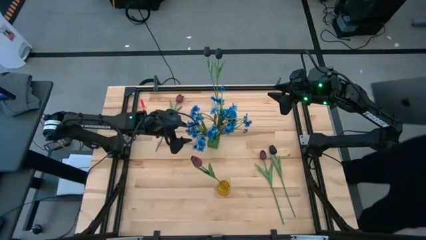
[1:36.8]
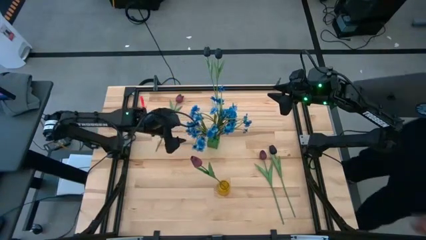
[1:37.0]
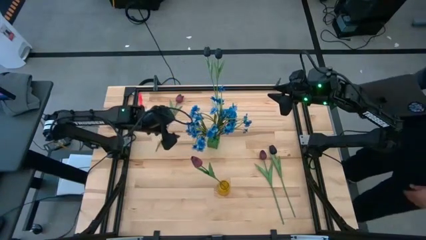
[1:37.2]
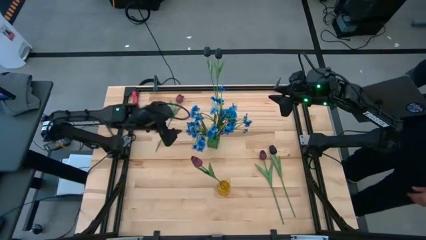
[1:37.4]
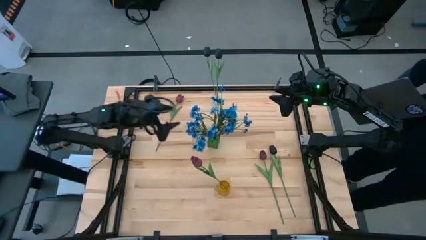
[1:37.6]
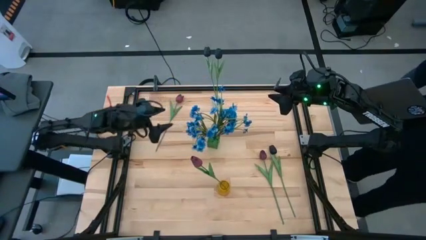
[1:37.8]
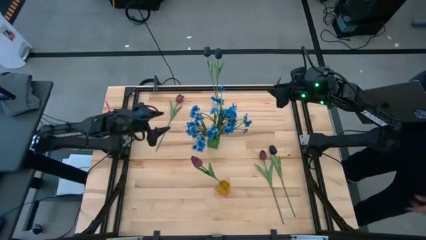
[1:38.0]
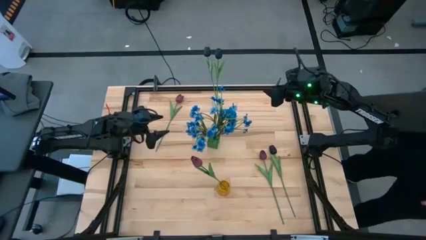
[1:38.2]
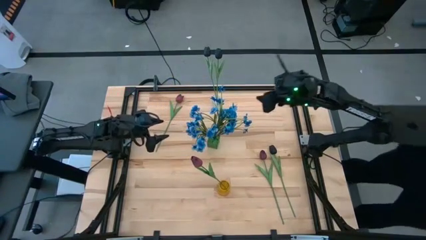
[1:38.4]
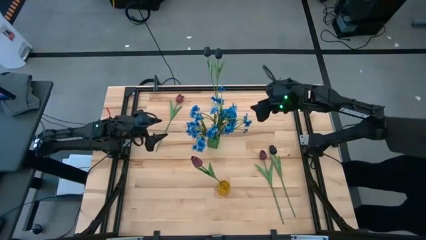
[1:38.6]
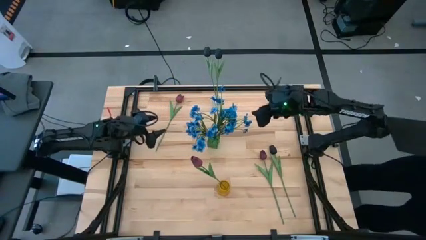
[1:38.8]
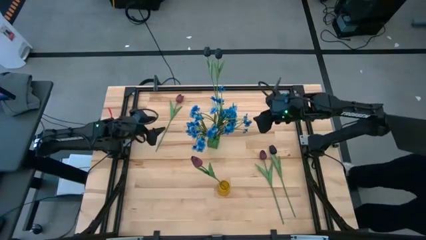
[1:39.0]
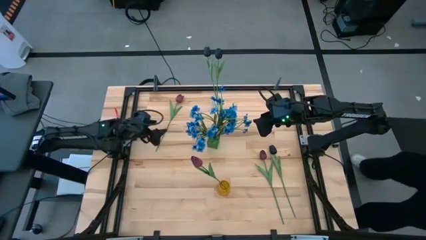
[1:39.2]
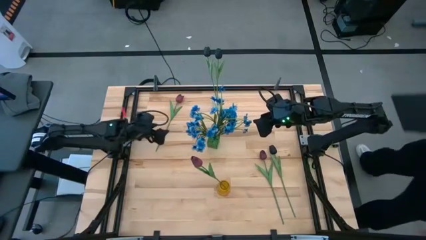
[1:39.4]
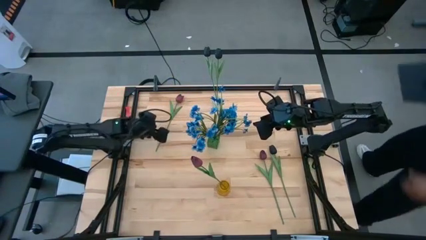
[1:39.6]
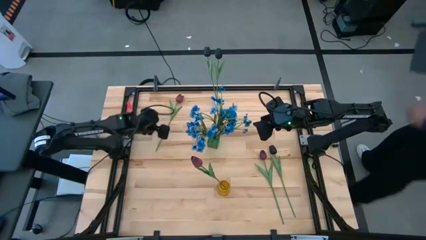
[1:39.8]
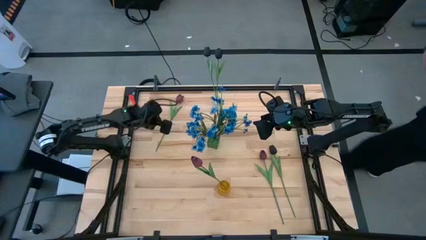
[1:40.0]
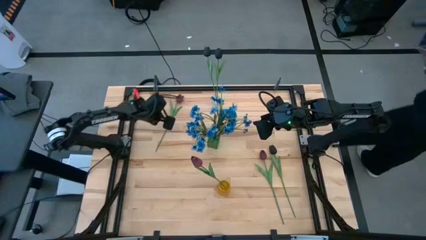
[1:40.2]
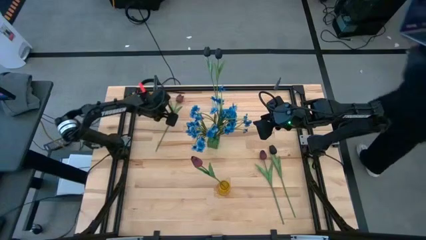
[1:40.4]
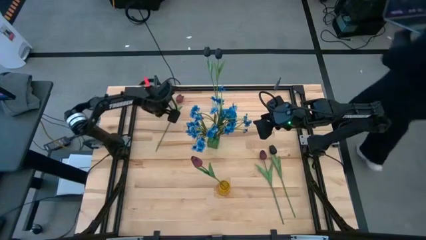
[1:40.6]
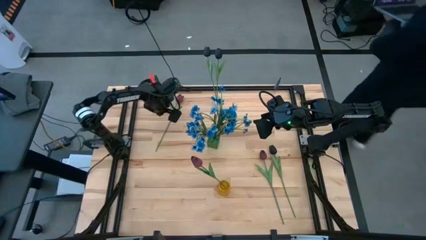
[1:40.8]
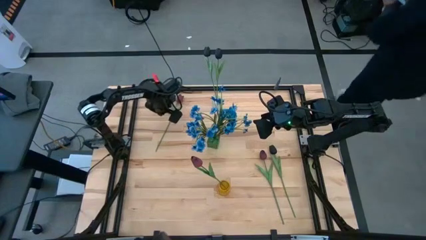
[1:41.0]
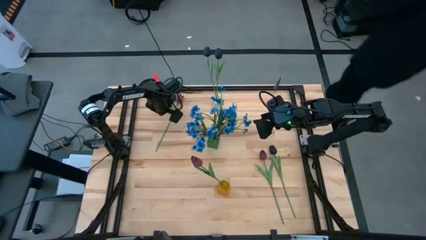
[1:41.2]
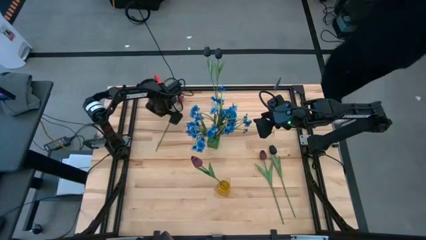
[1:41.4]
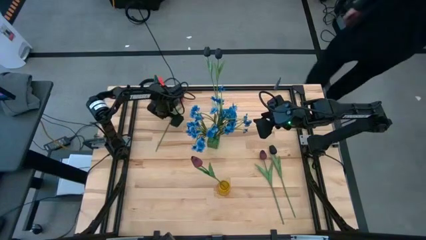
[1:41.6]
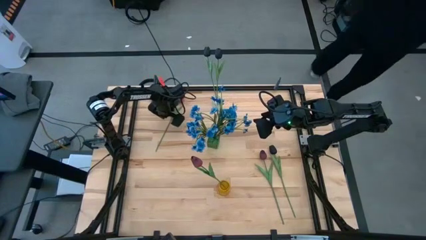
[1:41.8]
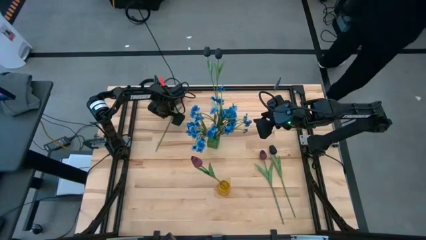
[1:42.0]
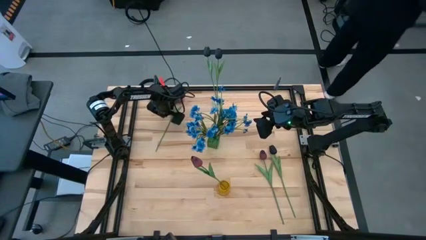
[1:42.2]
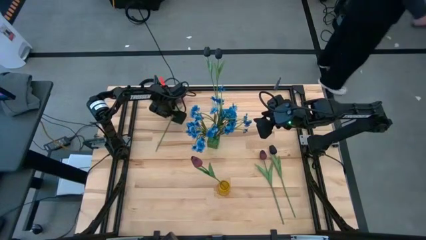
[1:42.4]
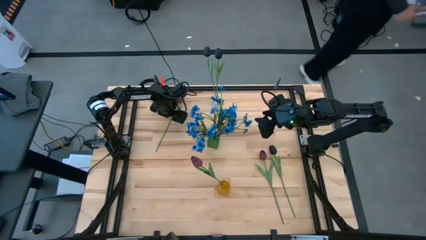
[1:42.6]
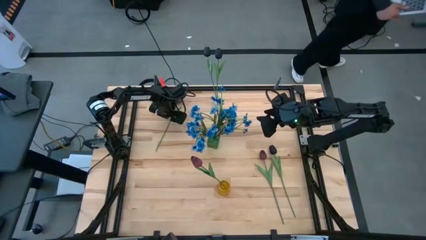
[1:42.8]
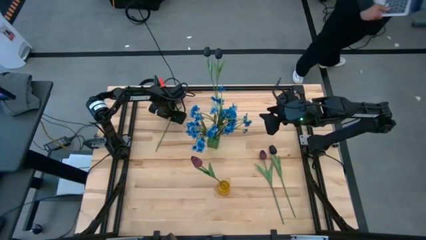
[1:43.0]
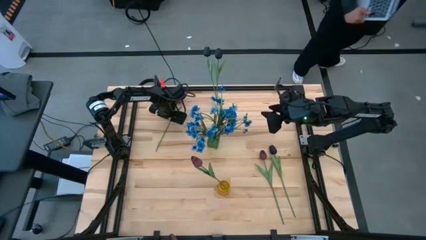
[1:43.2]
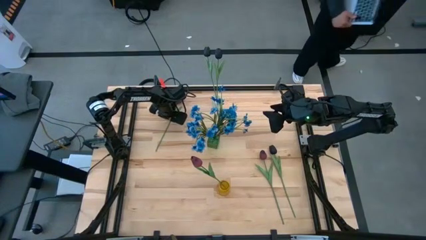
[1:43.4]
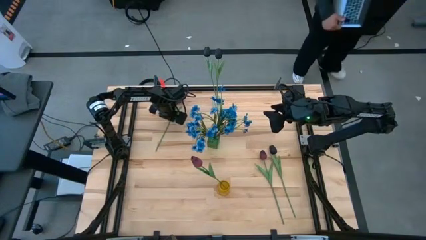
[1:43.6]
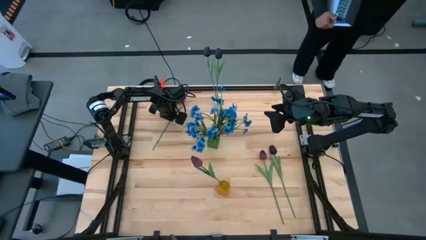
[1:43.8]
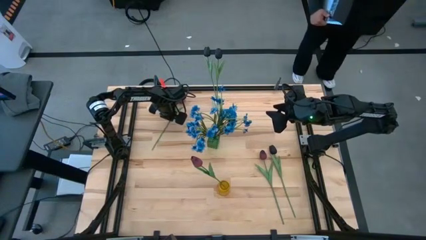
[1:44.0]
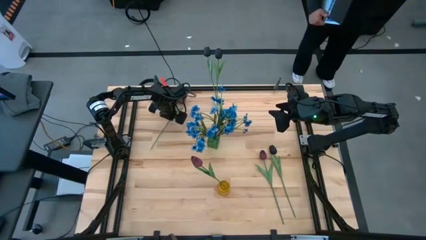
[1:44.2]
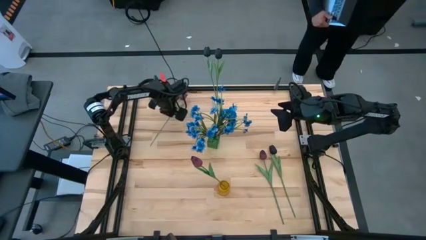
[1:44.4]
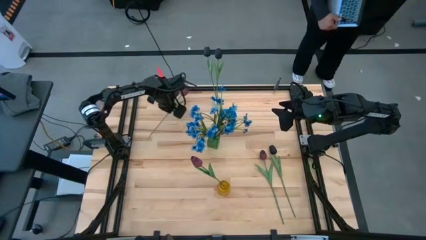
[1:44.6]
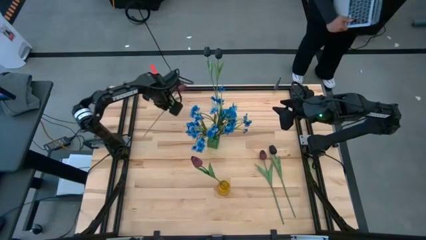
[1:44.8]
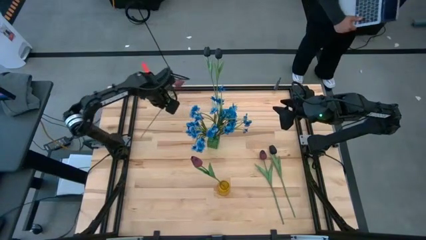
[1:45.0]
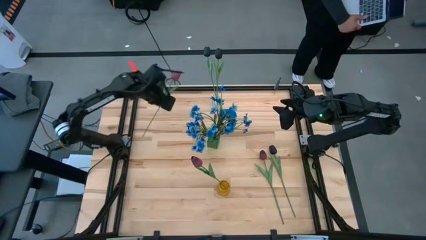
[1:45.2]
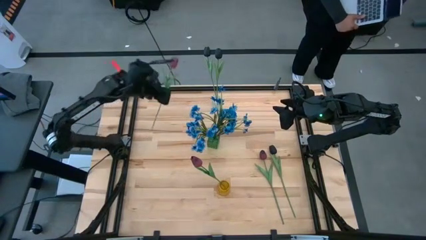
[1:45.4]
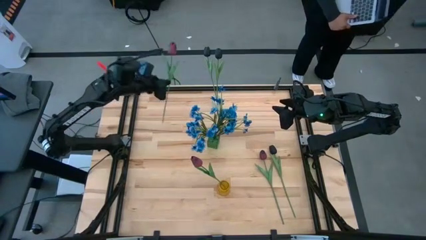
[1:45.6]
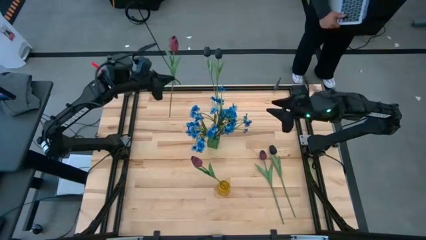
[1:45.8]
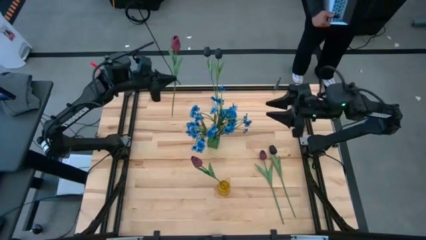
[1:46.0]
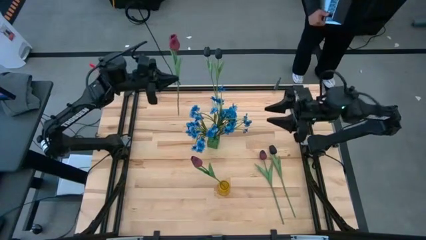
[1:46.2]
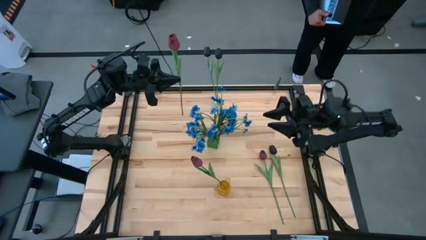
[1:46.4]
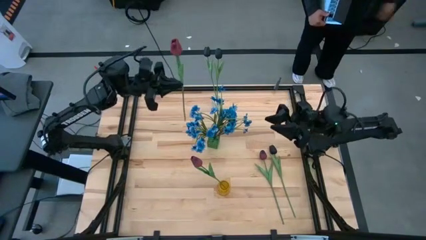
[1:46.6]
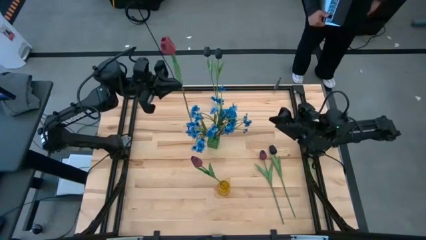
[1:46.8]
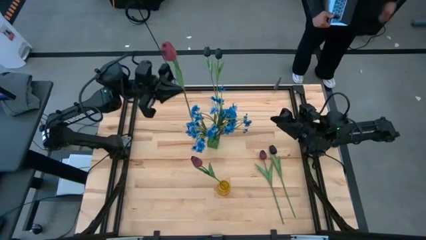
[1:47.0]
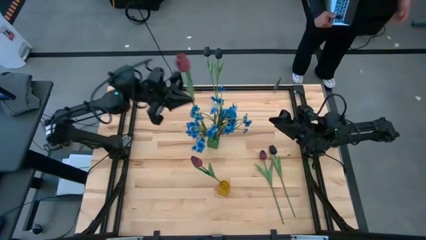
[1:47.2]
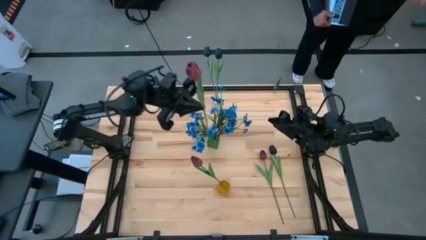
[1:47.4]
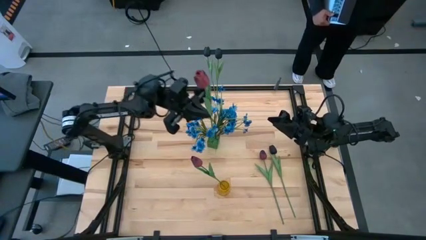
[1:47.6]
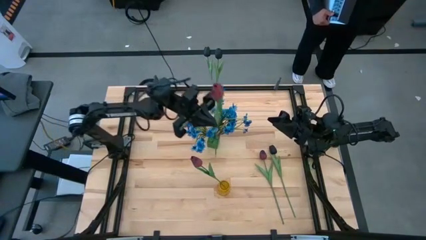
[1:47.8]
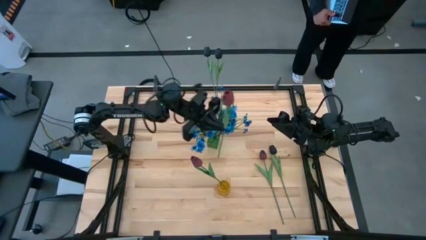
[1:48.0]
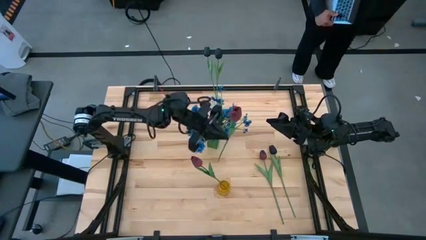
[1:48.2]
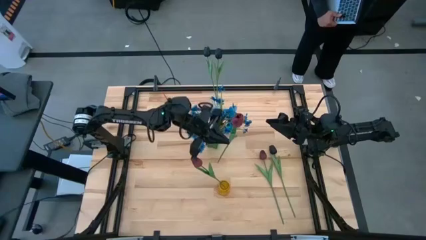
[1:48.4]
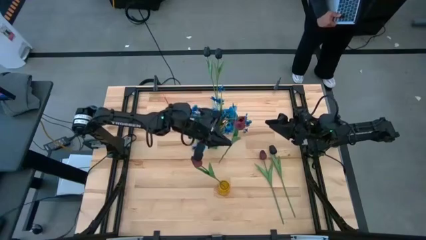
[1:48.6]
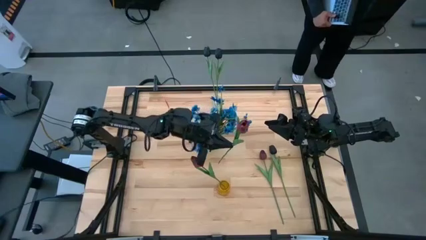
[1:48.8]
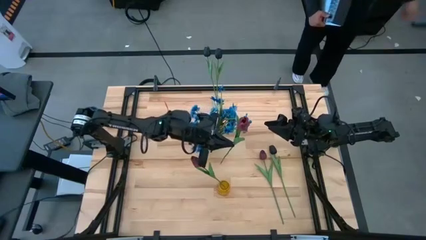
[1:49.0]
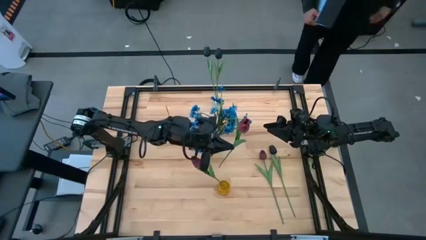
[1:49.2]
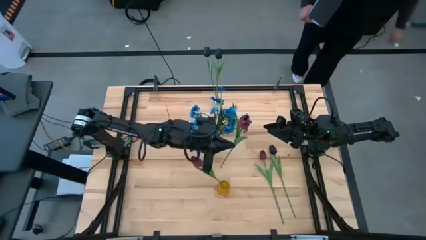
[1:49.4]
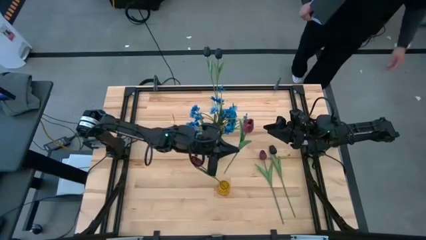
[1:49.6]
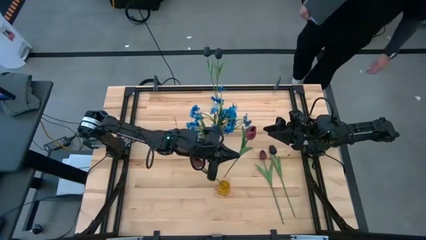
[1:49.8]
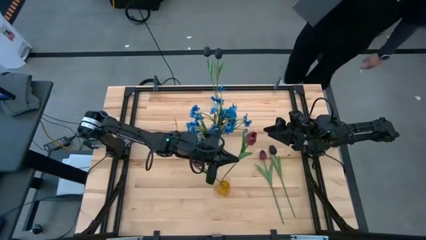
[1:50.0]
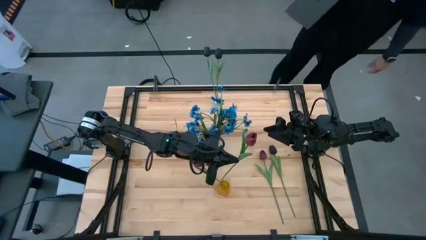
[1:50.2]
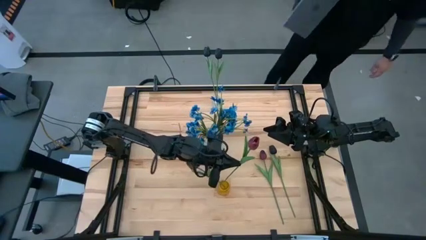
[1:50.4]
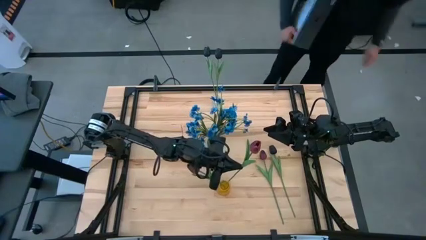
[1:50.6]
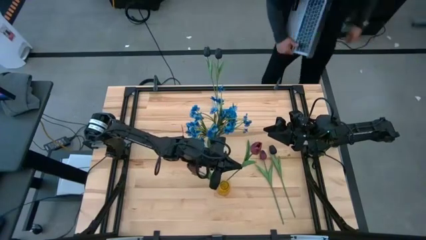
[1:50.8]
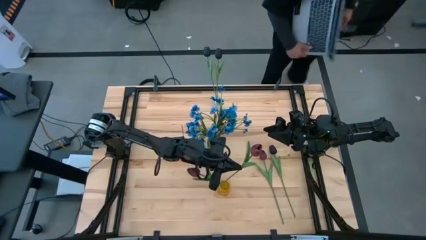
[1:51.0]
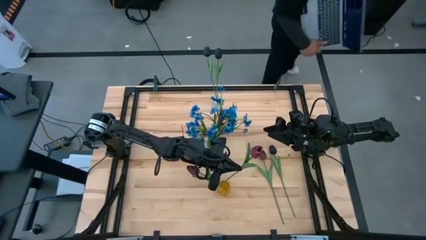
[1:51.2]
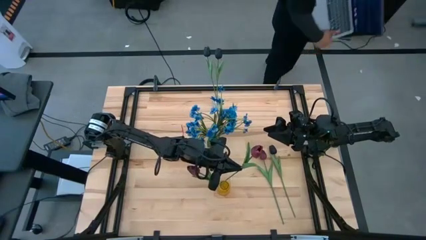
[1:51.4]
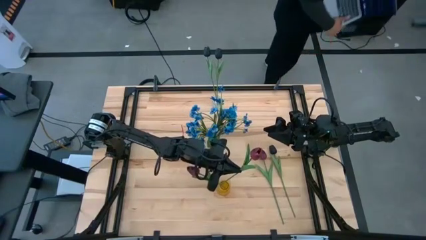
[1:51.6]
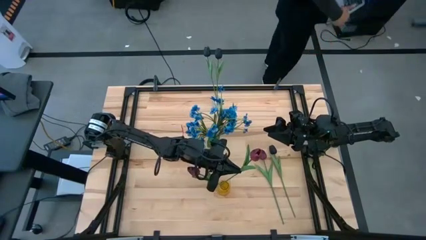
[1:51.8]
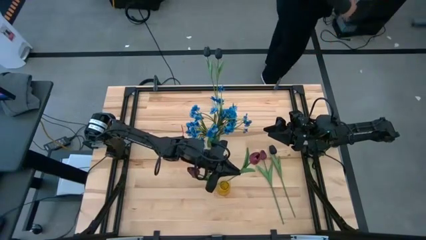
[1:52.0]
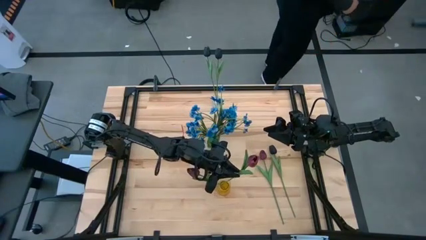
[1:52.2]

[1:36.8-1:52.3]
Task: Sort flowers into vase by color
Put the top red tulip into the yellow vase
